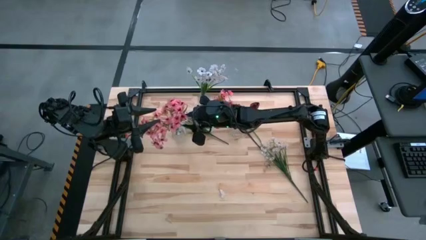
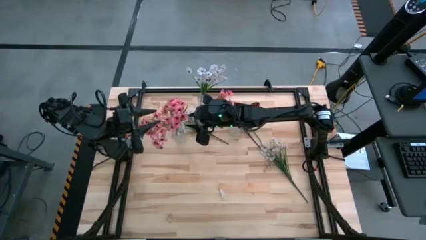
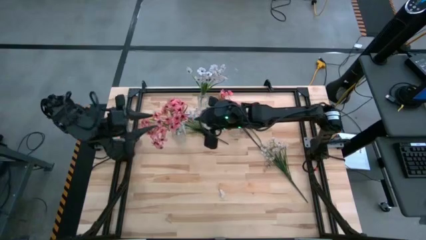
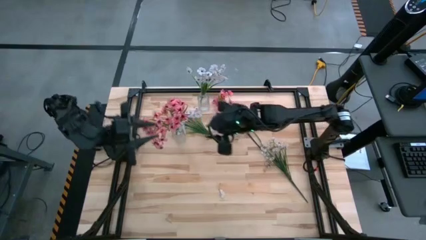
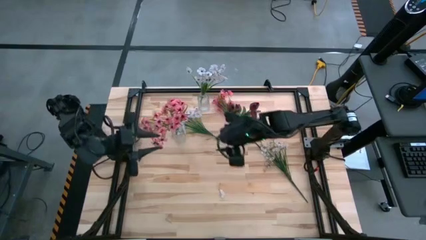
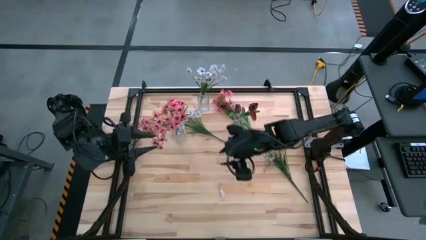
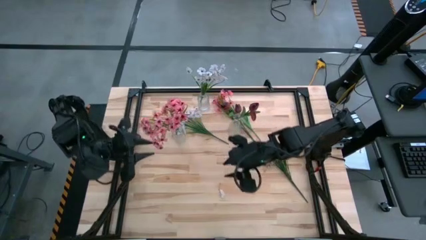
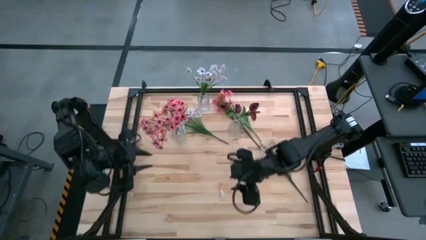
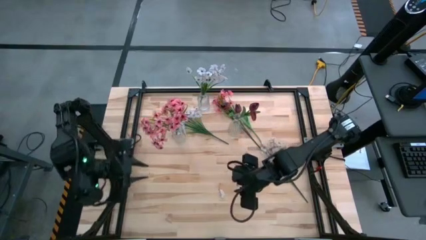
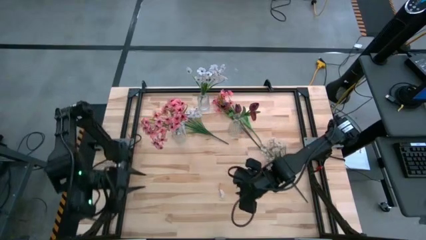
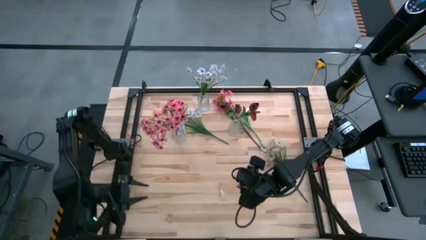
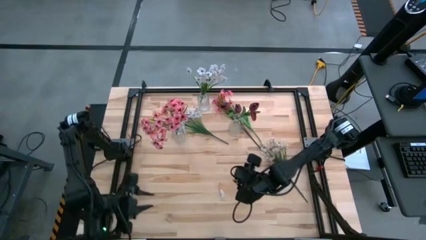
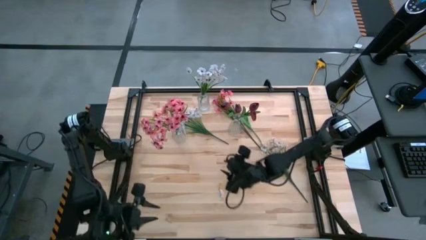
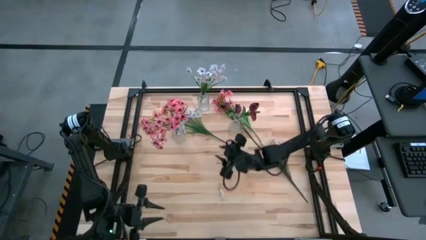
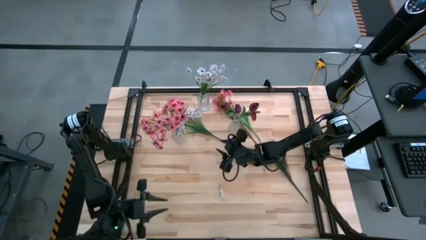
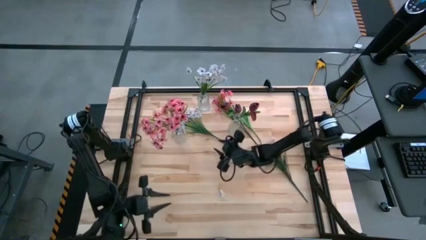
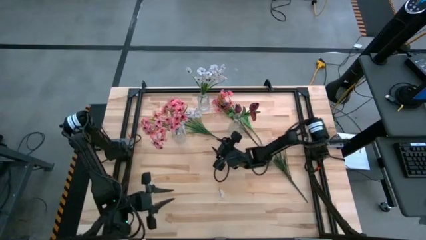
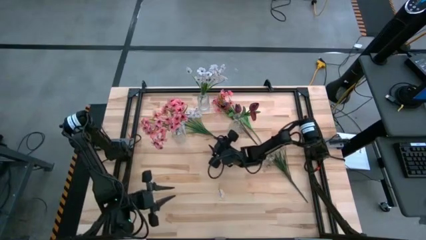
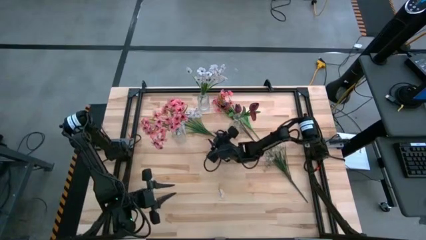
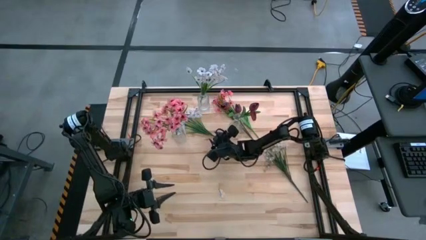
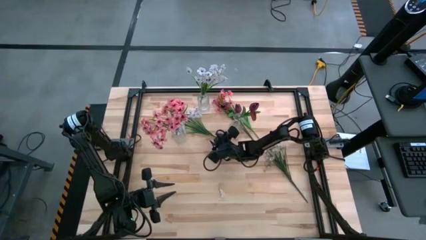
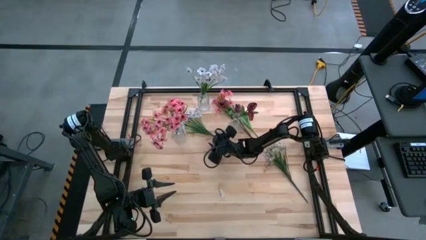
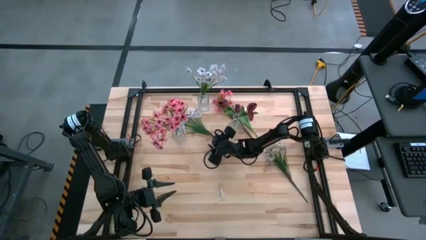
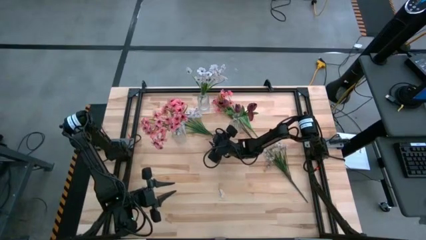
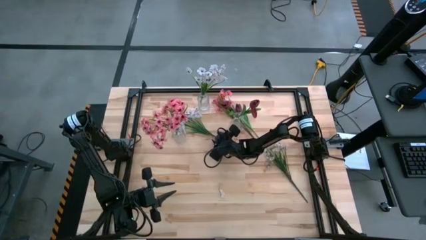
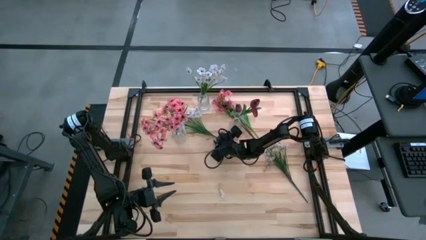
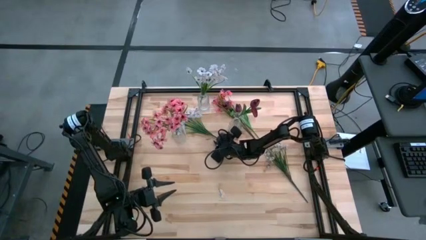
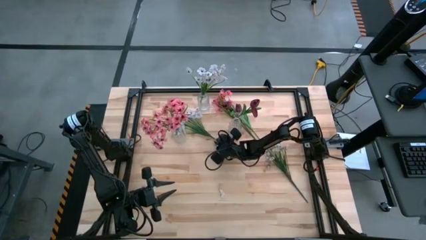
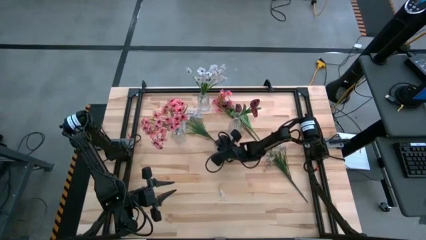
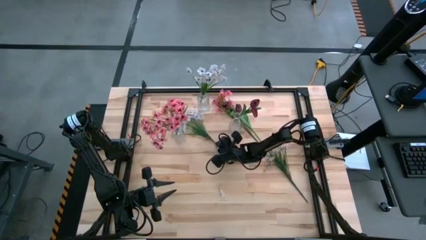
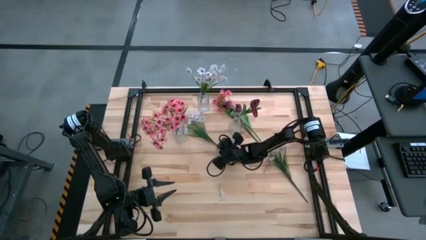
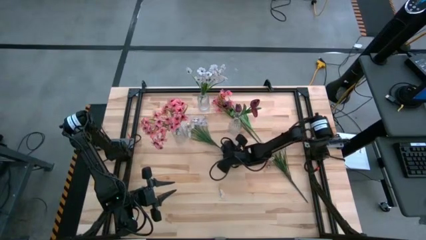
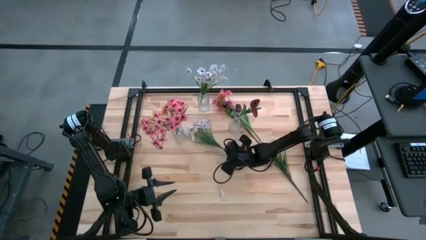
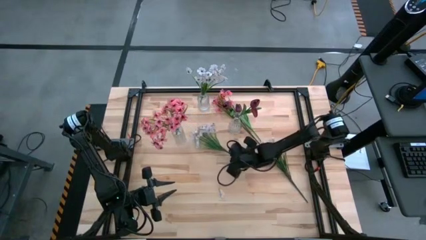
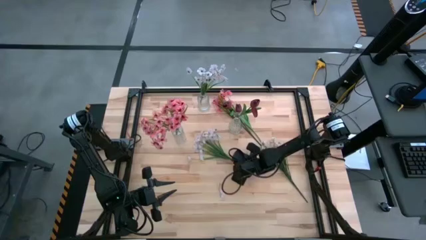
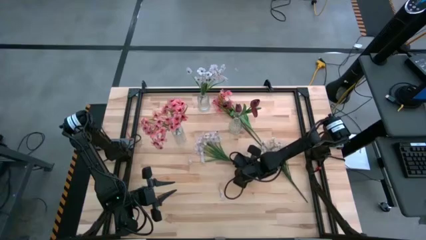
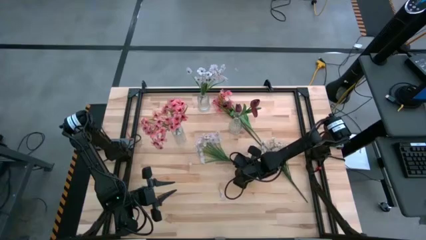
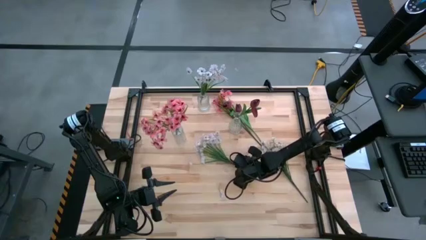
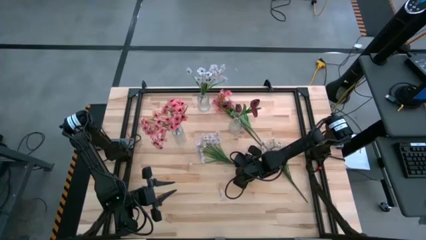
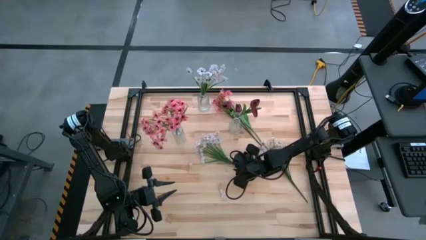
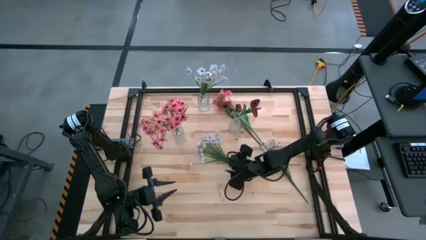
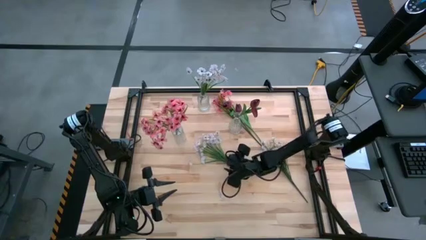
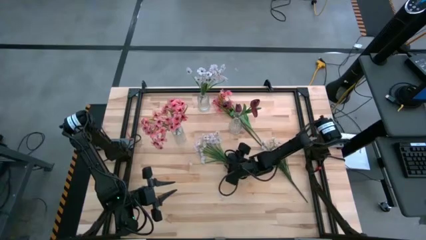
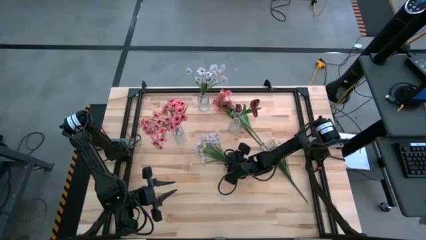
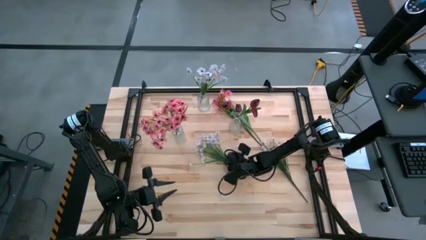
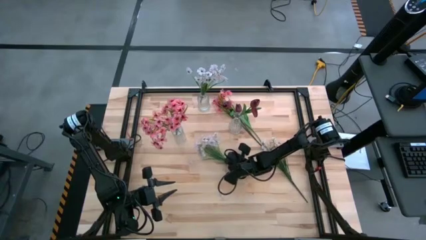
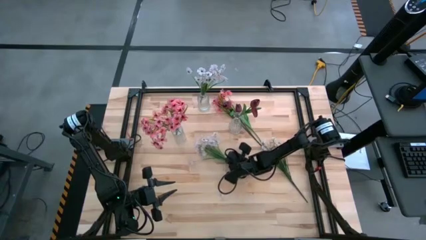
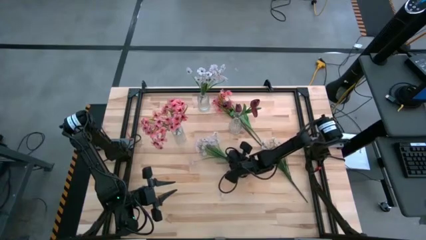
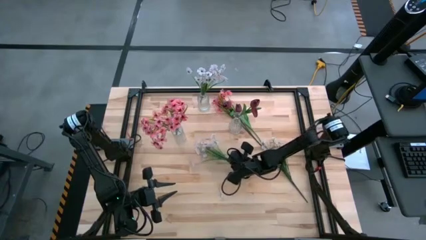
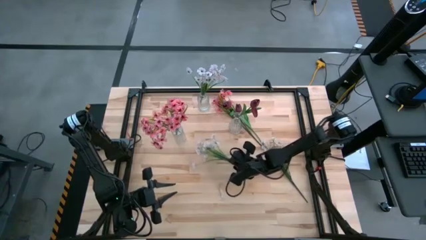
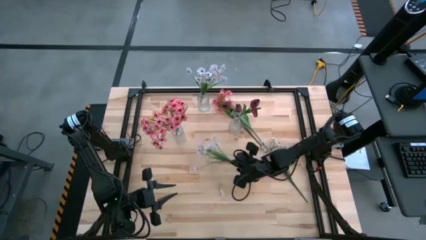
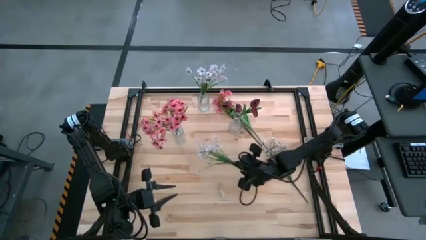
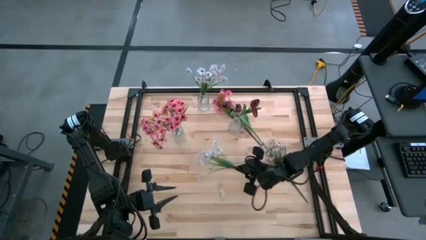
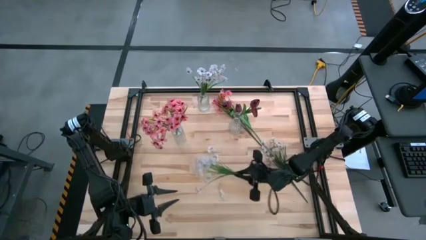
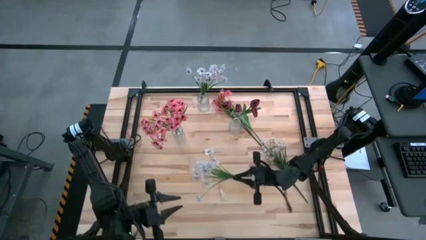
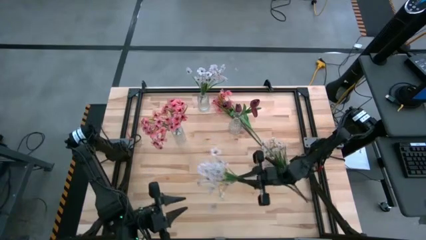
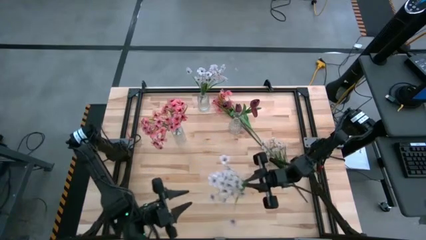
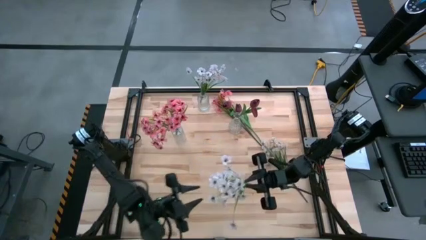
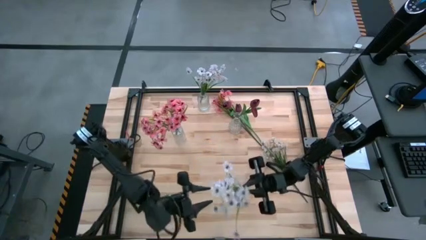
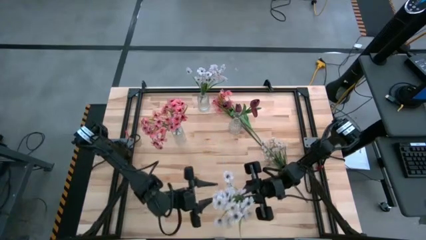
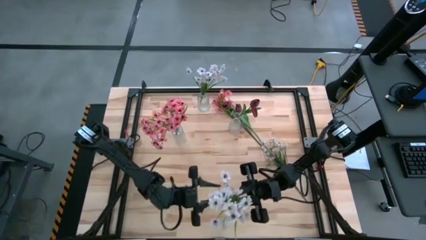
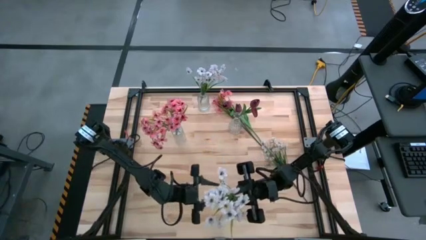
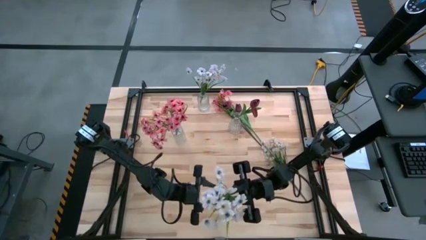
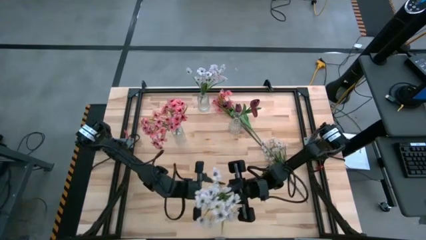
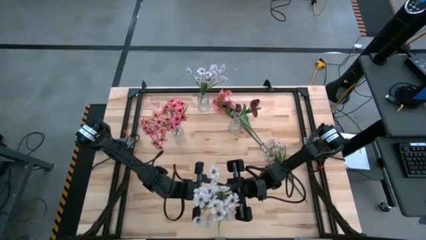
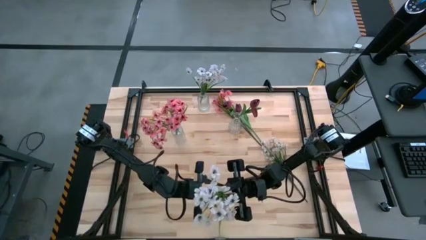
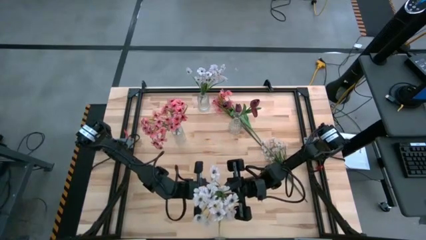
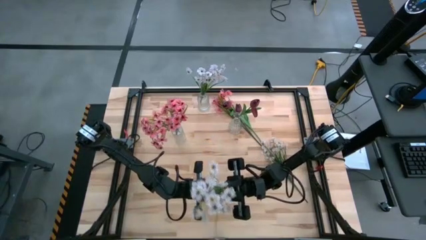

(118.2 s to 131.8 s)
Task: Sort flowers into vase by color
Put the top white flower into the top transparent vase

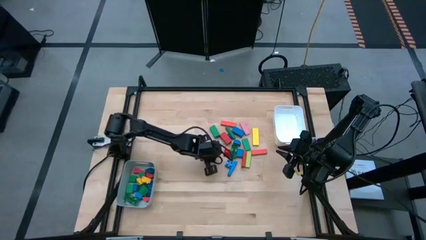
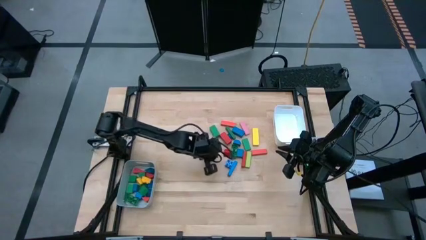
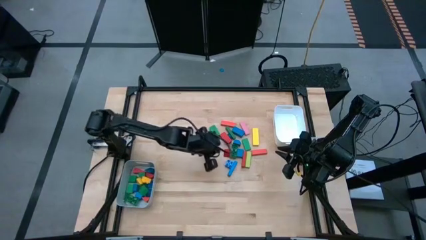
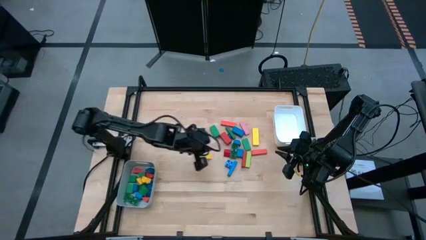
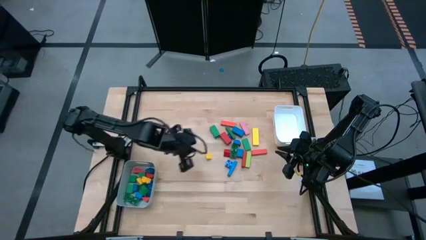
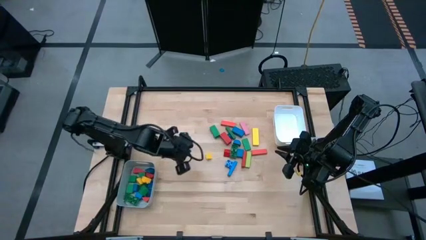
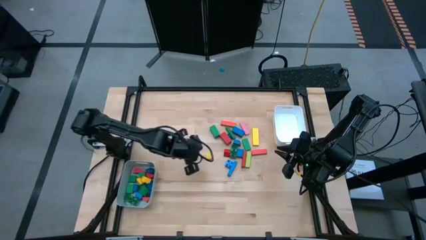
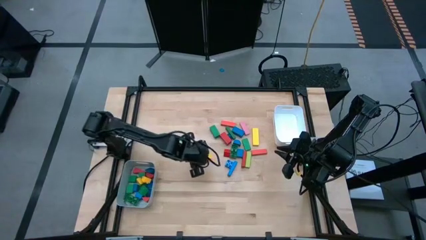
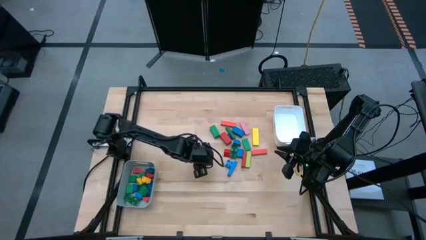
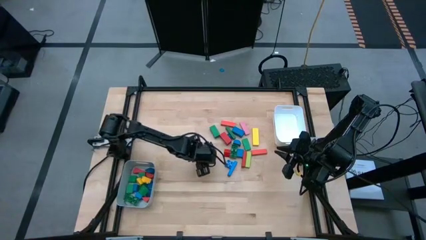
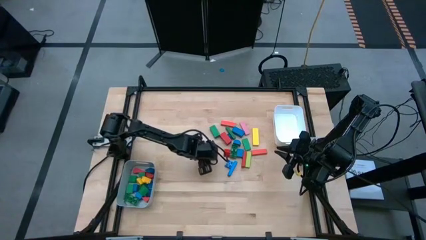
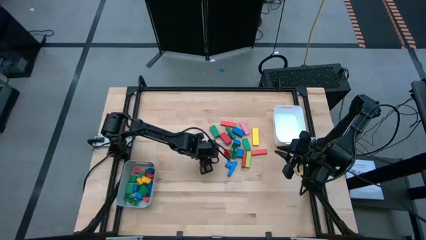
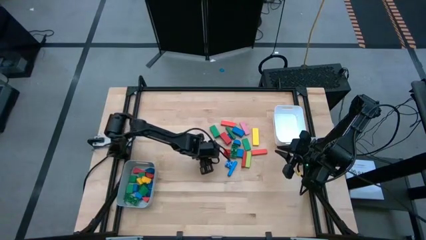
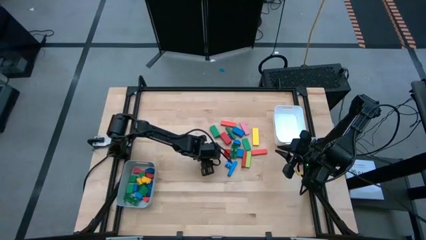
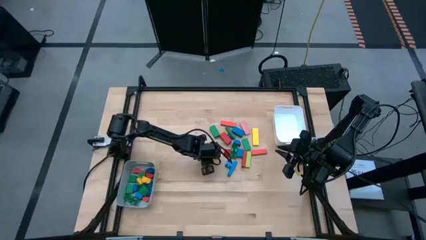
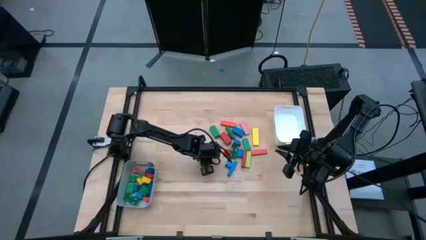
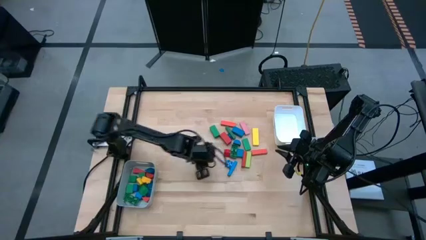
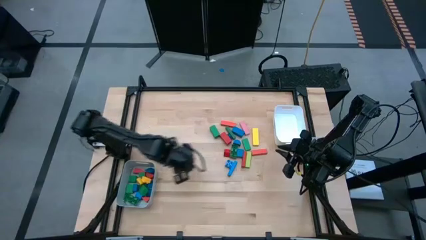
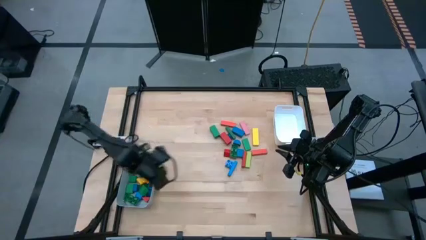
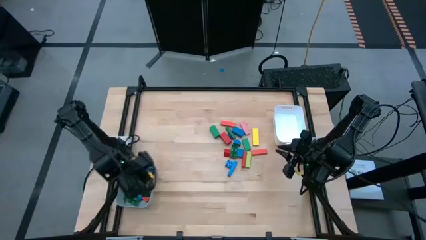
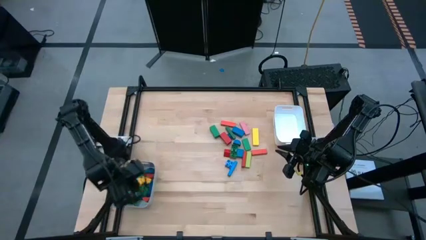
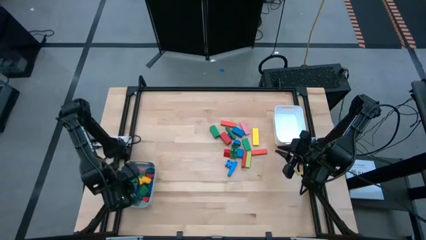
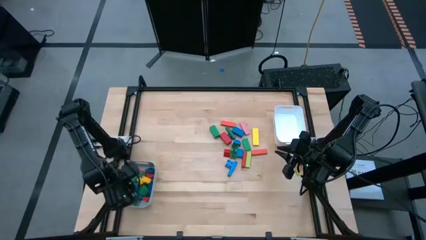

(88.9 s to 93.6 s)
Task: Sort blocks by size
Put the yellow triangle block into the gray bin
